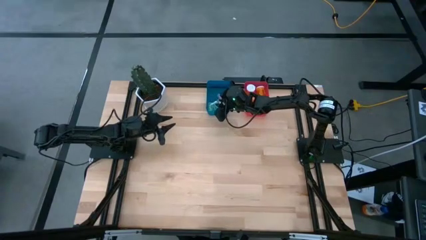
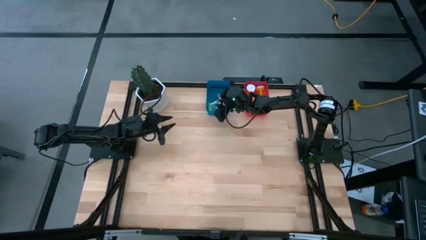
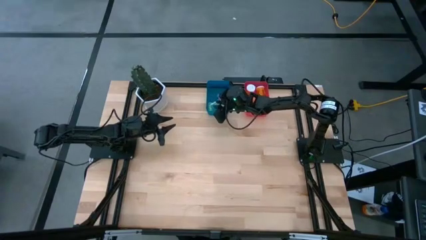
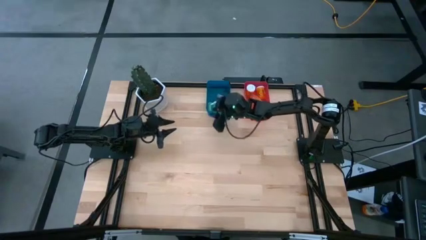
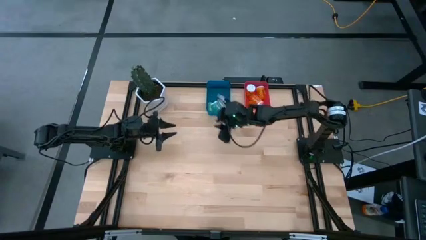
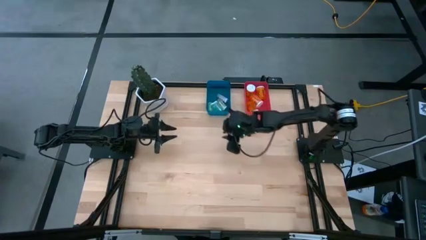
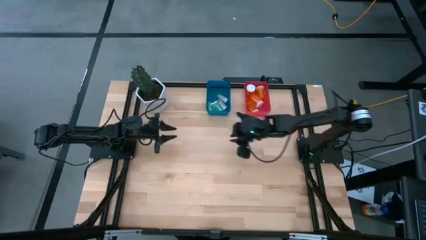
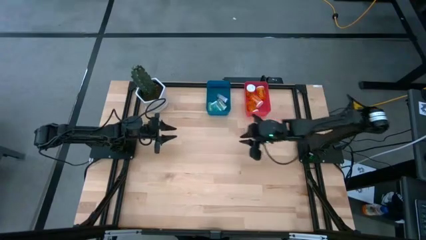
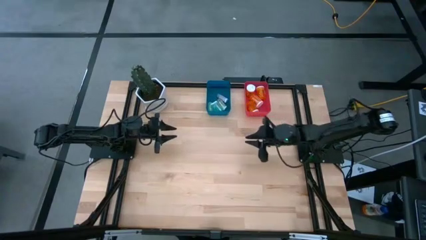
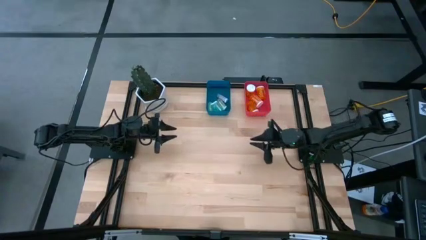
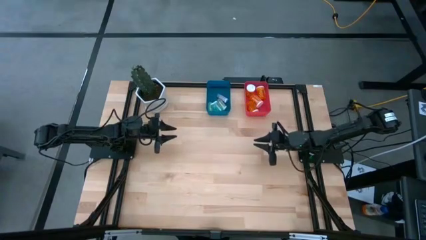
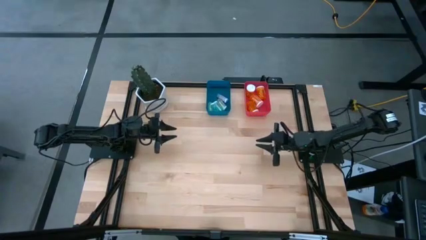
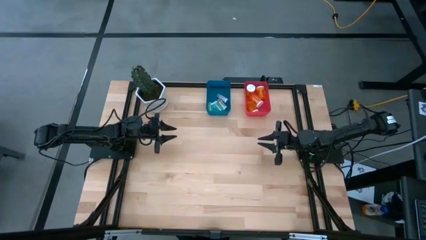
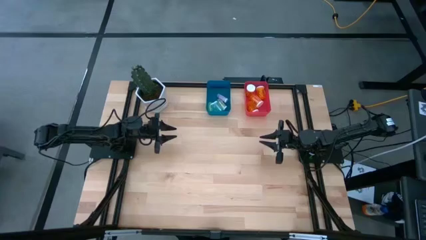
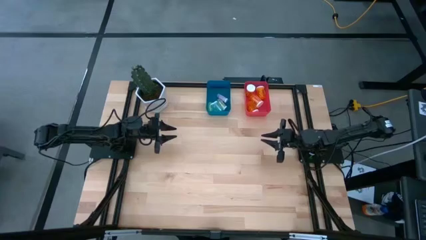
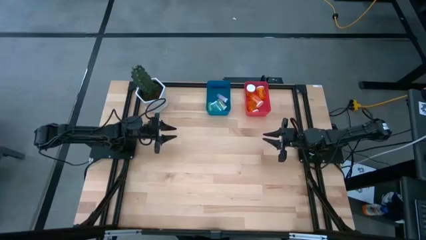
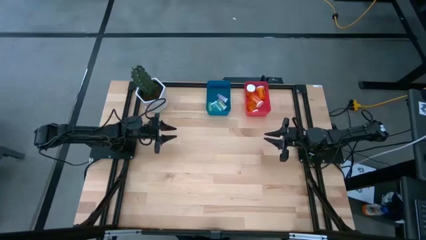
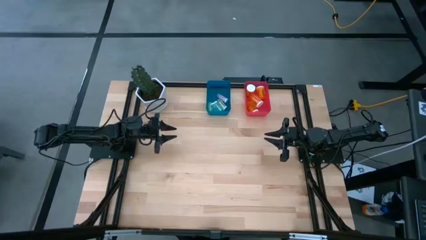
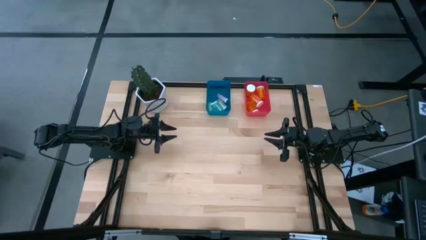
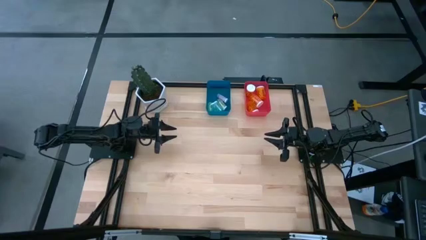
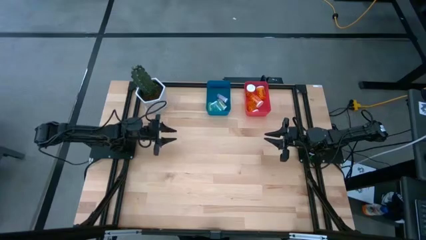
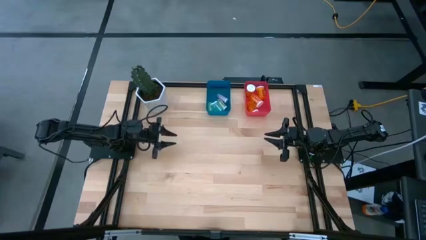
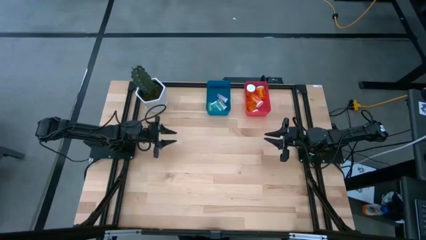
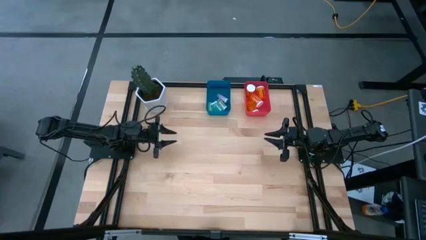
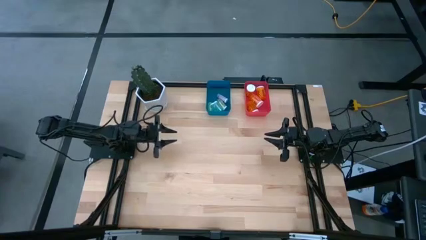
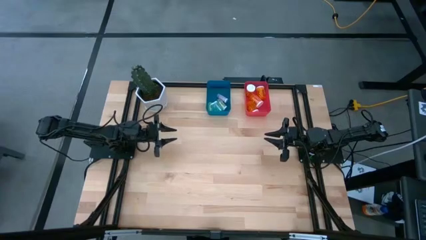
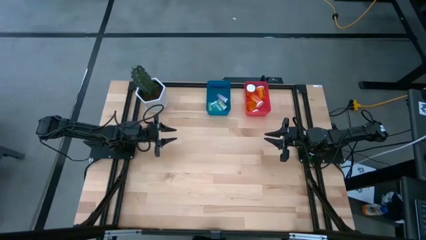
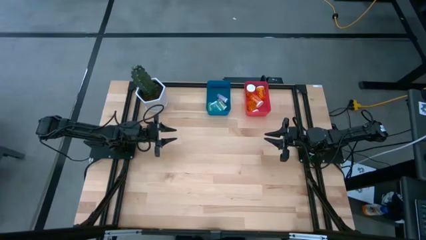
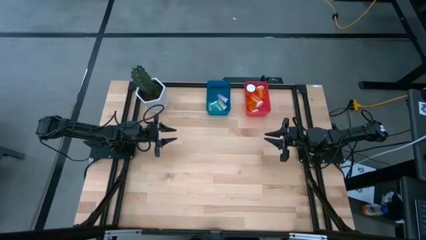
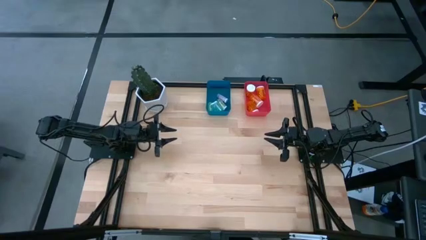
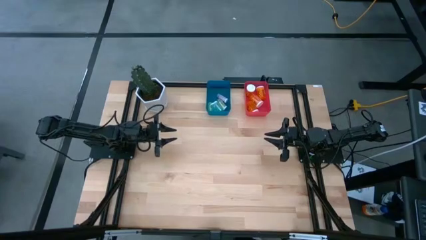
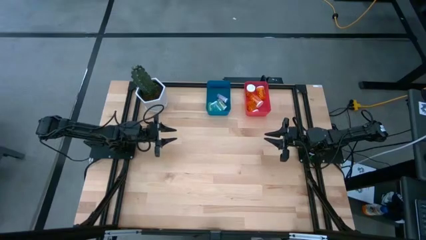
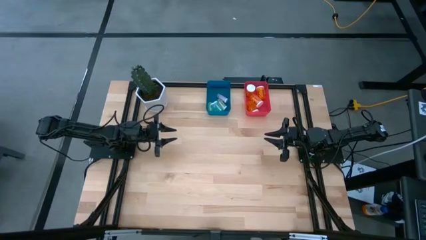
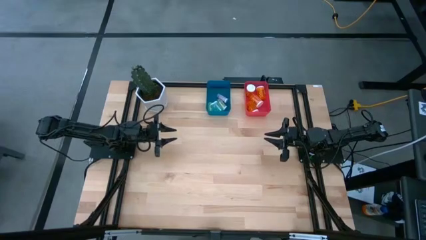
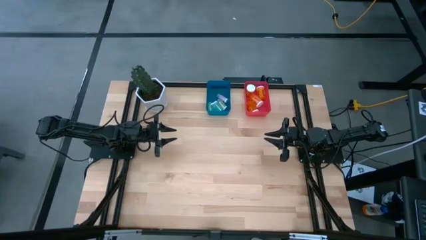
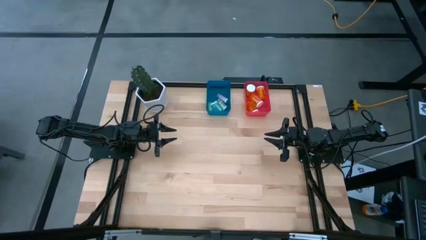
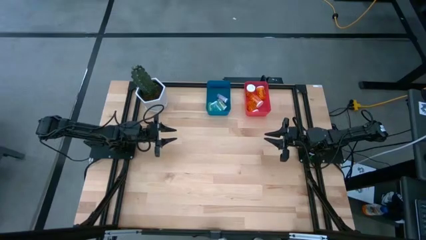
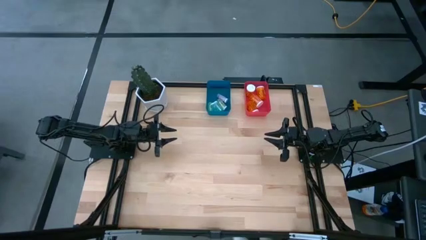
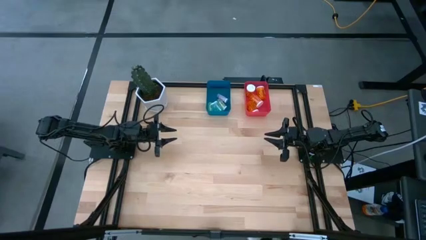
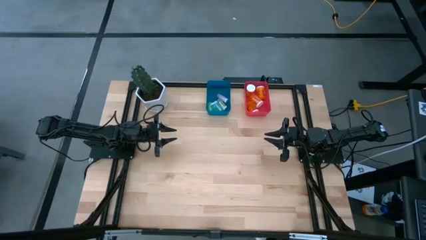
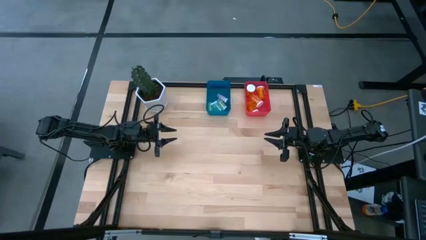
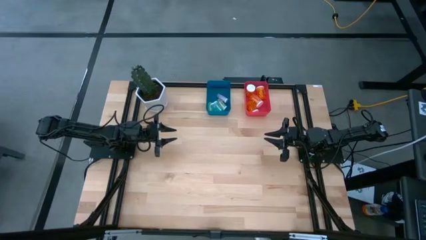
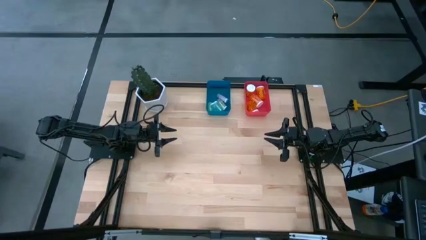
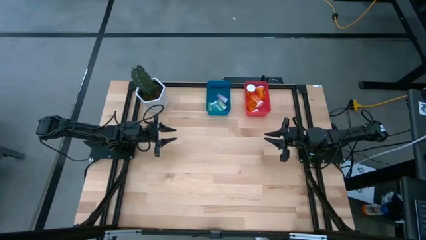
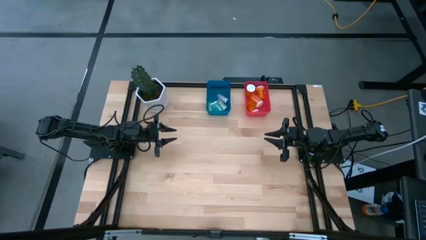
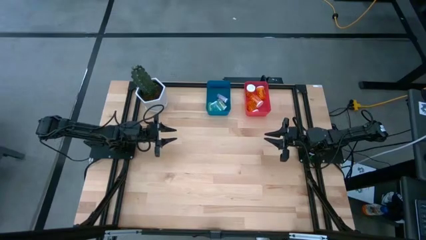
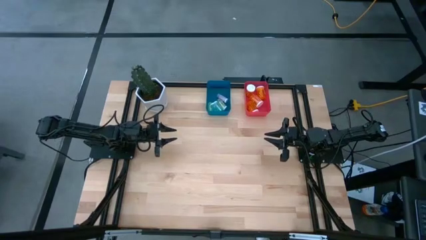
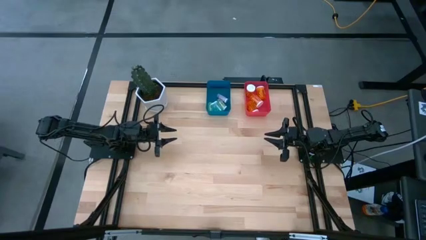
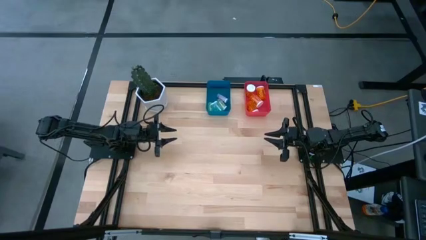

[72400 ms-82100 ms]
Task: Pick and place medicine bottles into bin by pill shape (circle, oval)
Return to Home Position
